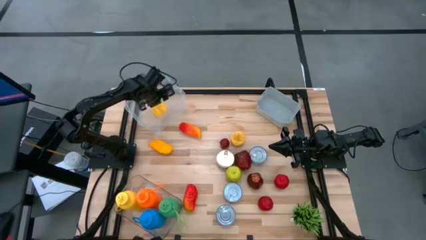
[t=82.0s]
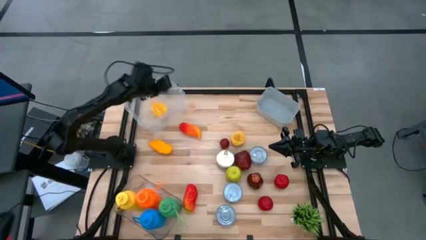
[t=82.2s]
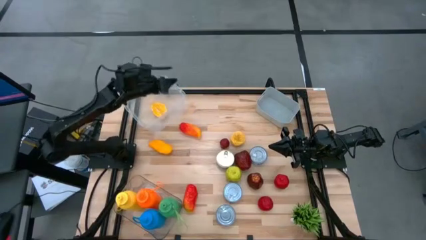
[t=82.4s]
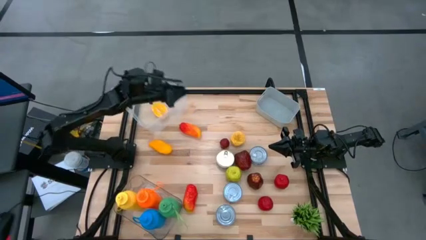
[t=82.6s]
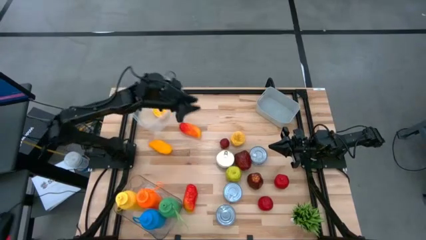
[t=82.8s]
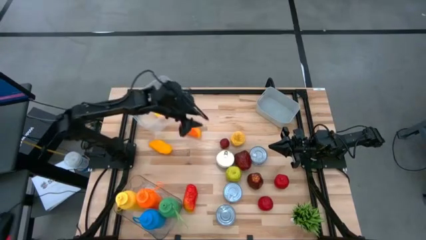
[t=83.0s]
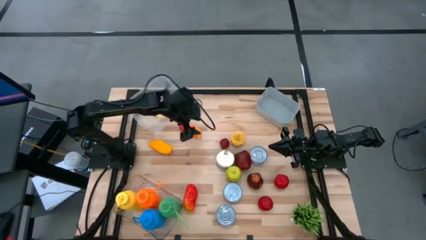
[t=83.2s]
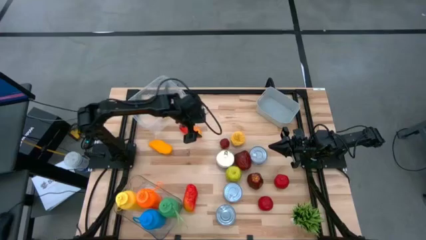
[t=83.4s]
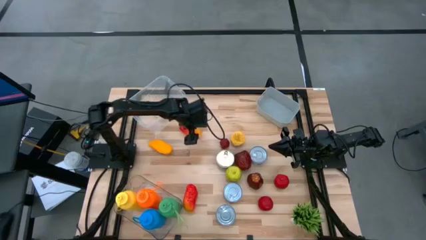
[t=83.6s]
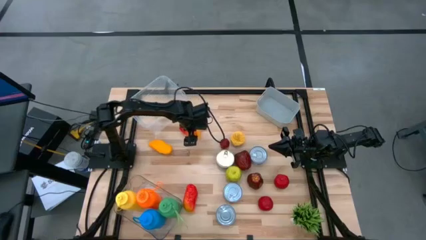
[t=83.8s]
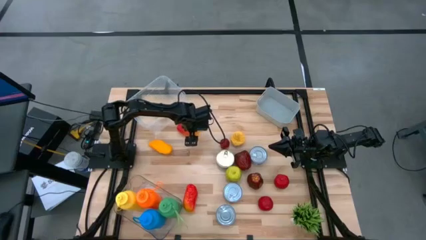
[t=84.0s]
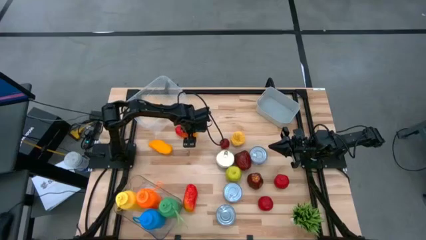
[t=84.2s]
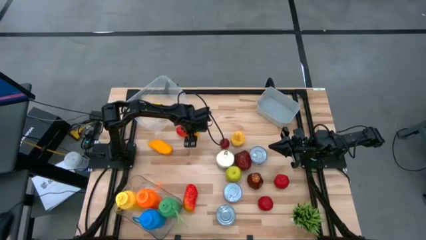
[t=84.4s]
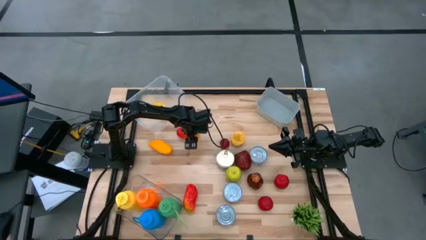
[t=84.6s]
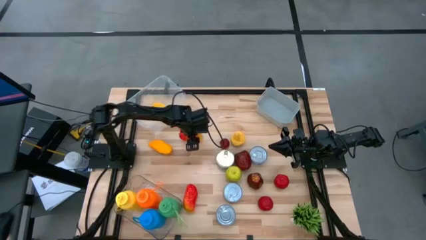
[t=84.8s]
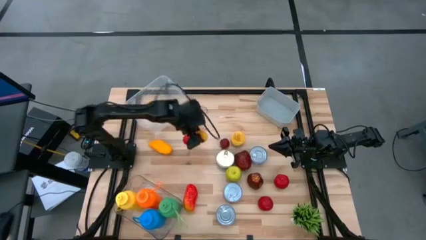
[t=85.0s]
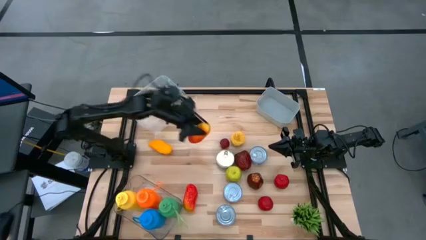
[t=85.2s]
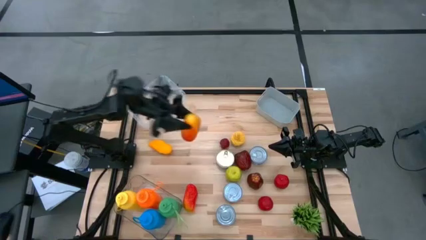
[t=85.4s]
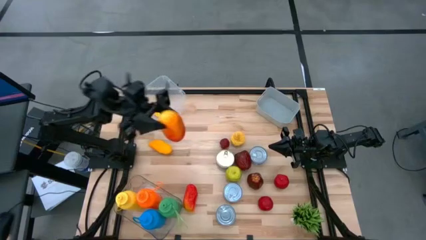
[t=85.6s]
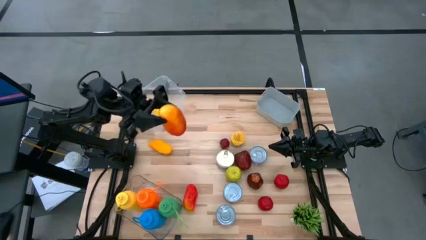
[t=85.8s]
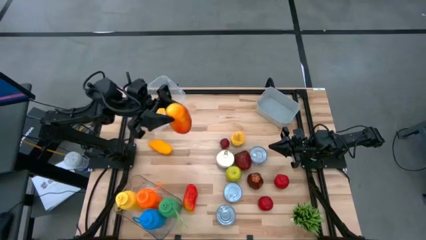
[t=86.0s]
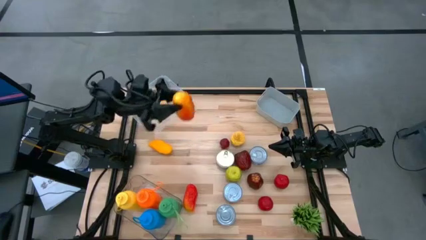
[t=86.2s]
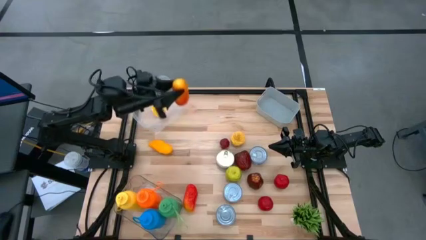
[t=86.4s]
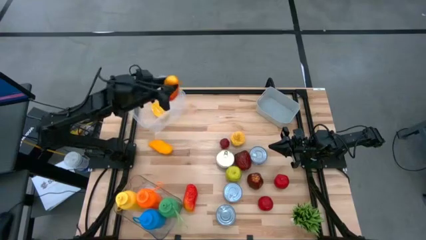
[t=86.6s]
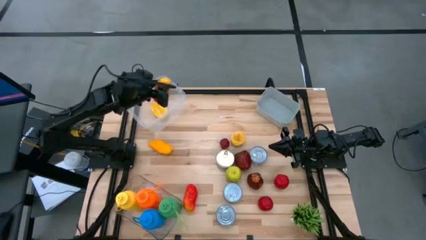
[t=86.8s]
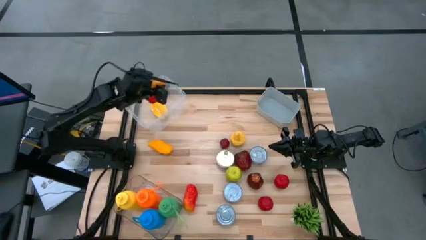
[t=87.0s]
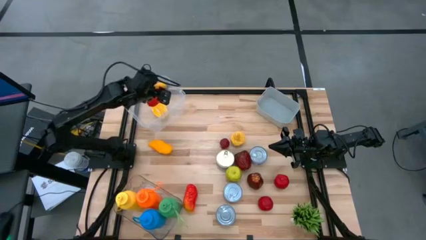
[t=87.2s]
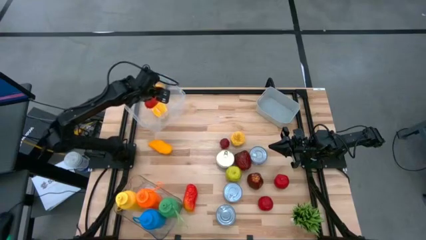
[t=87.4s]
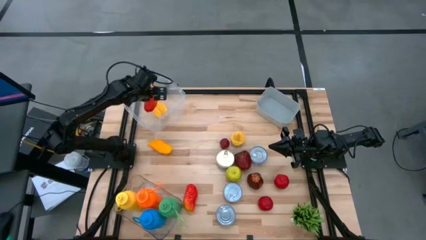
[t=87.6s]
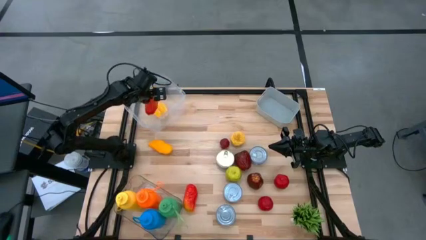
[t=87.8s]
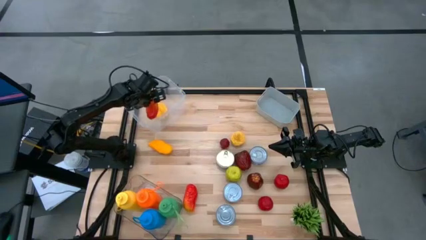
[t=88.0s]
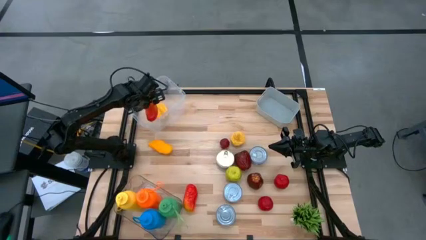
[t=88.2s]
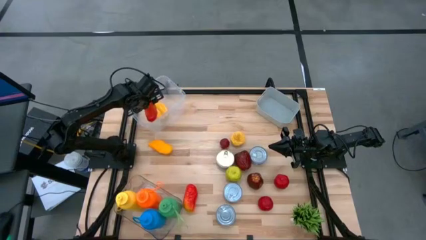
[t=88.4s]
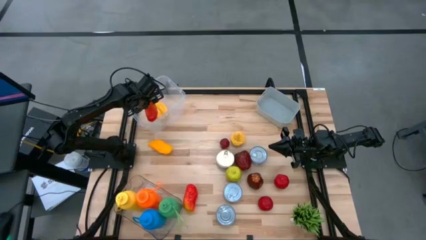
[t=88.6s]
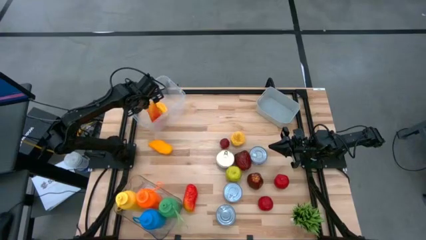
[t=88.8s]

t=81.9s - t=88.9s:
Task: Pick & Place Food Item
Put the top red mango into the white bin

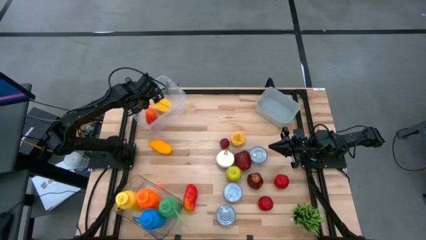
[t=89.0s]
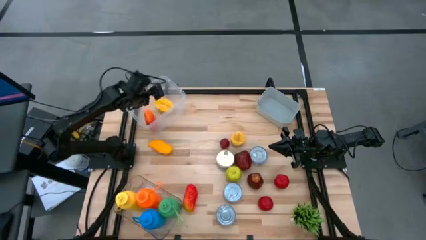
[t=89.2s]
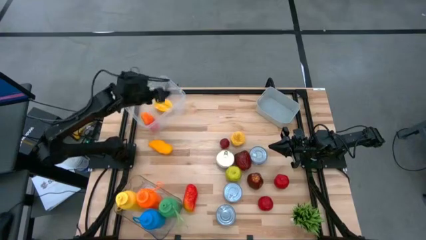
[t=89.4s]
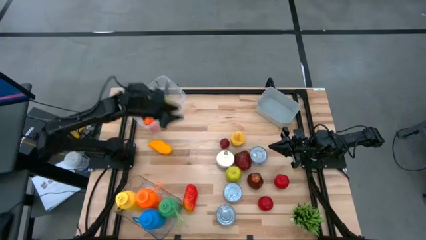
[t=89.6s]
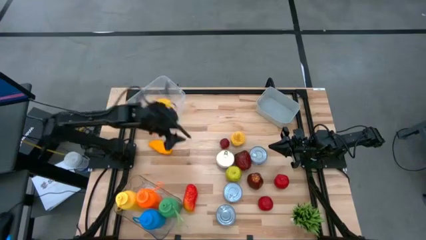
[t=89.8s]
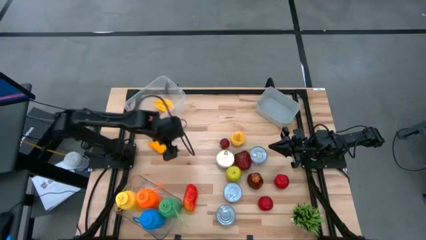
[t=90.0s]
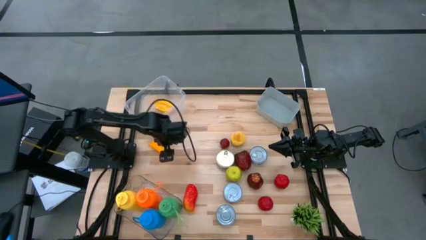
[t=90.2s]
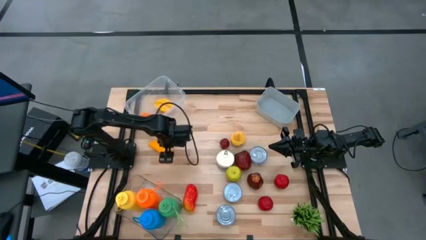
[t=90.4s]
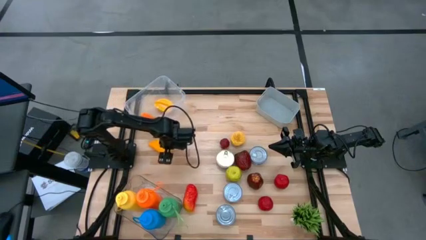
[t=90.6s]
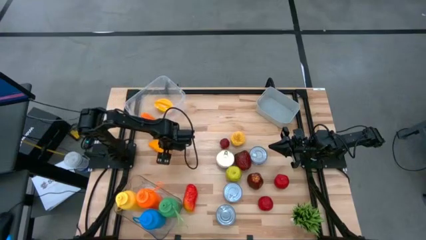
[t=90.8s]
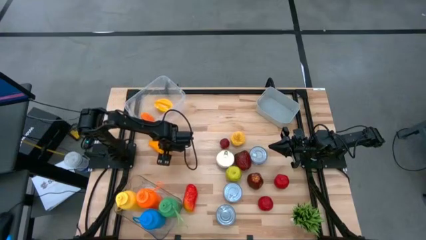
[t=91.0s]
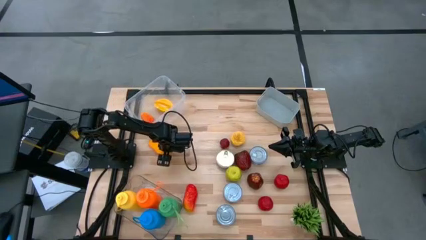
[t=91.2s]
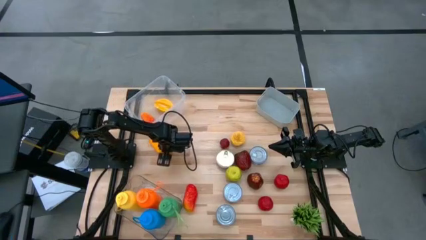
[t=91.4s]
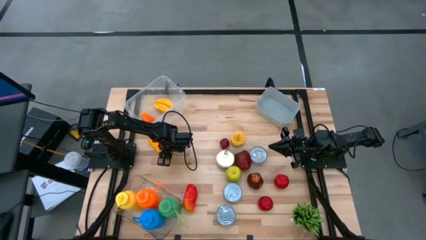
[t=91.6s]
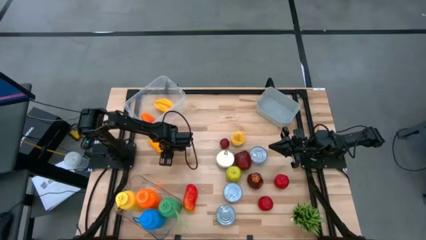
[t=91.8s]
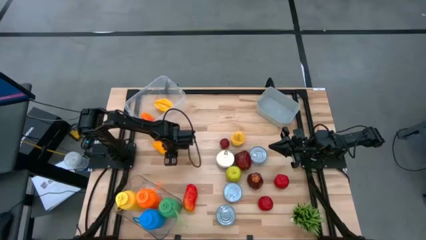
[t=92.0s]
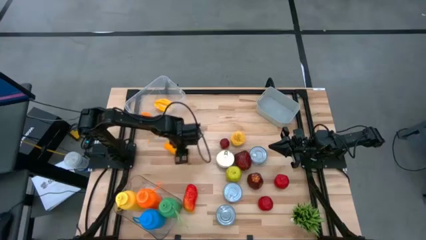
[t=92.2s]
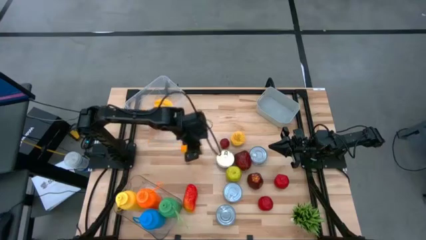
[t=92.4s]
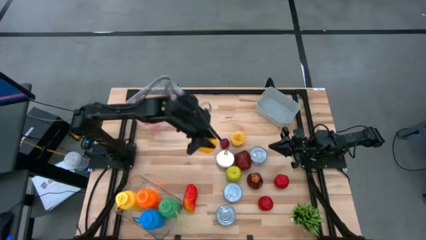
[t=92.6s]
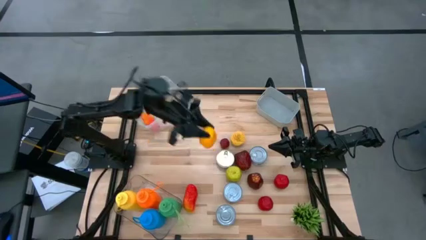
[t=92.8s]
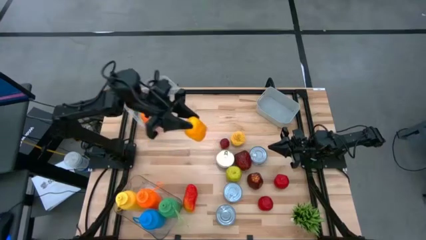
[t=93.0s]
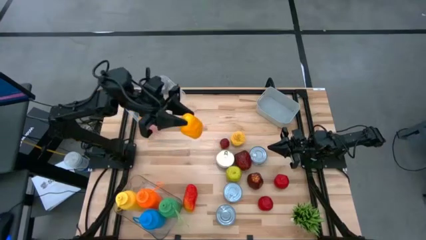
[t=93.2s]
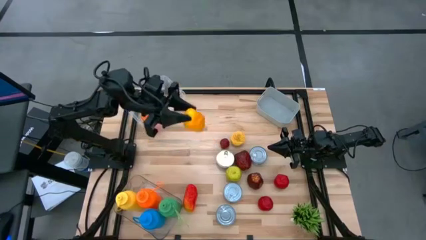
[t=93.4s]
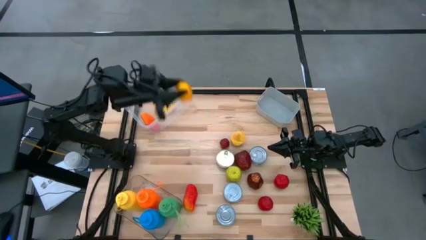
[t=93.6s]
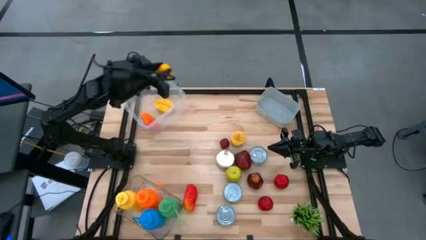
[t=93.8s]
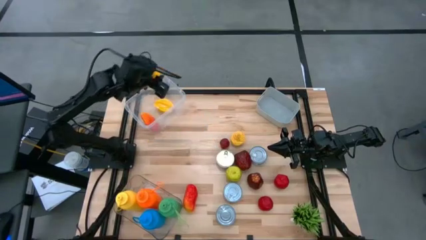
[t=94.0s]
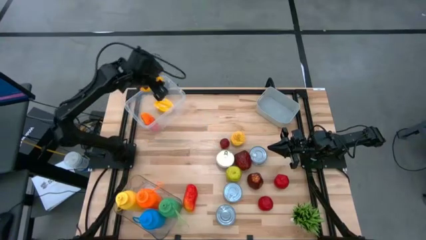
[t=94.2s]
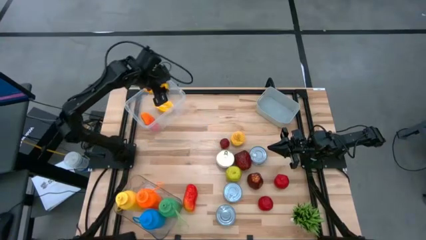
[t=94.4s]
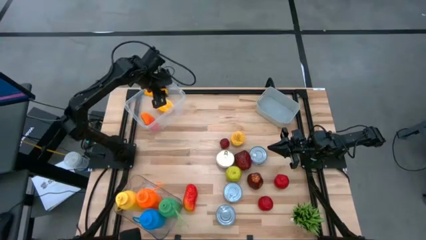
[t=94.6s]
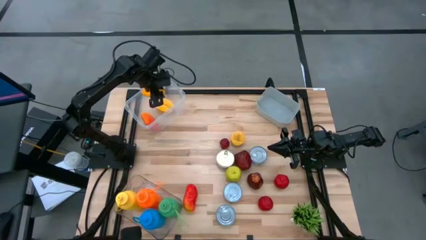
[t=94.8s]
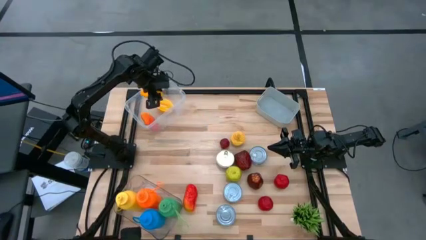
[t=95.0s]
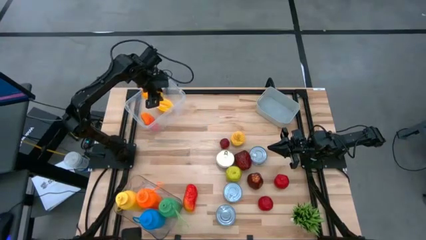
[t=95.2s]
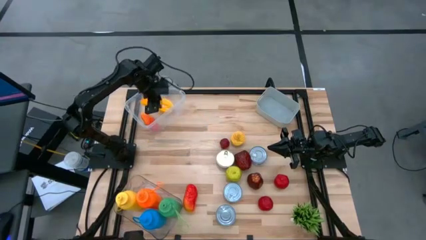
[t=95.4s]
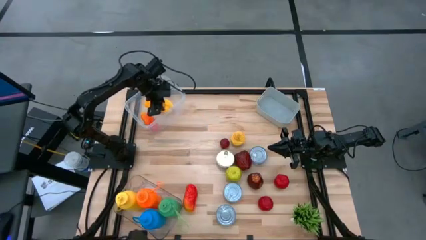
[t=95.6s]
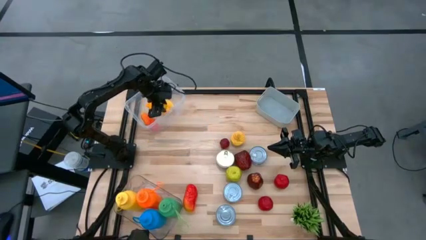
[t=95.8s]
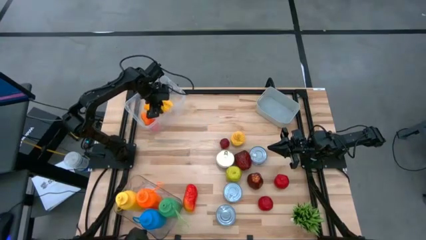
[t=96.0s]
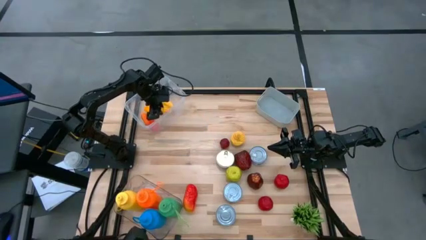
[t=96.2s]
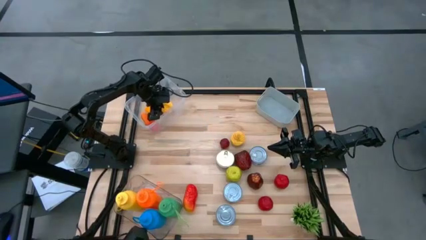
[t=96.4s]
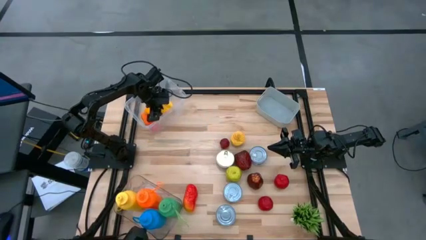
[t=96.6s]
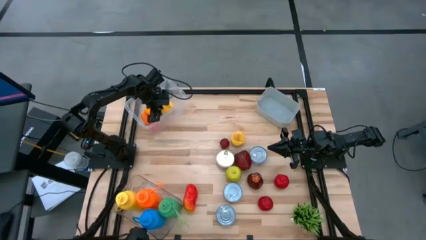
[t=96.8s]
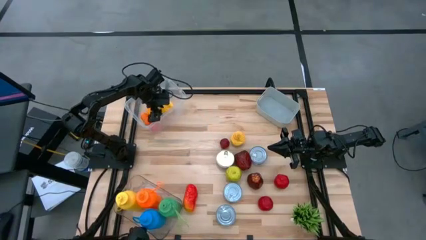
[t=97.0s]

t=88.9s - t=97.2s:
Put the mango into the white bin

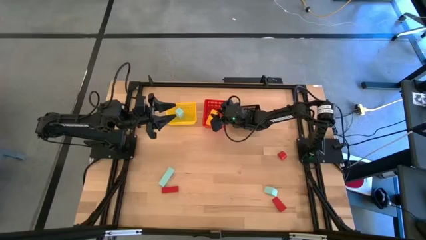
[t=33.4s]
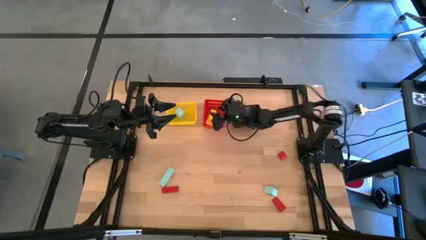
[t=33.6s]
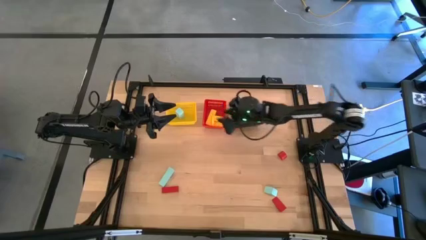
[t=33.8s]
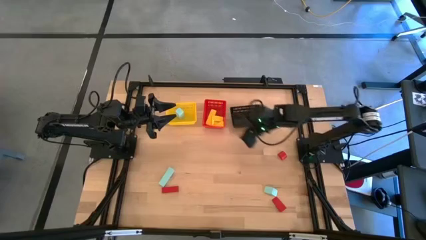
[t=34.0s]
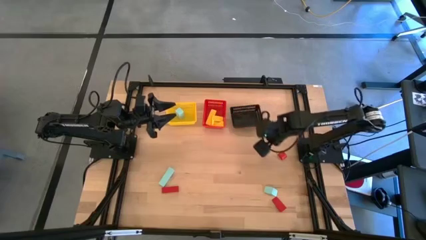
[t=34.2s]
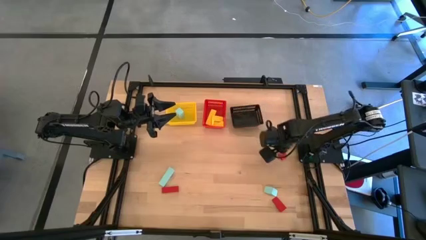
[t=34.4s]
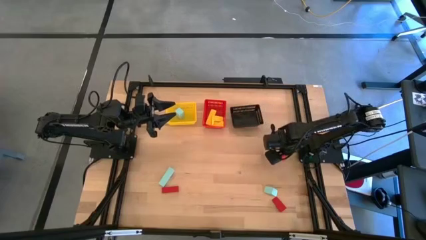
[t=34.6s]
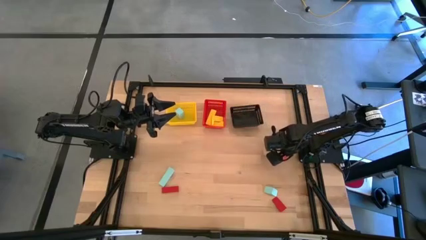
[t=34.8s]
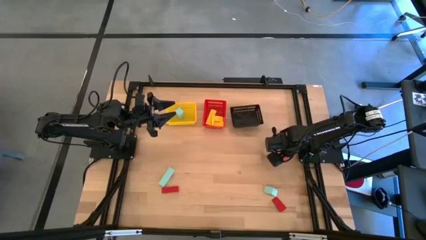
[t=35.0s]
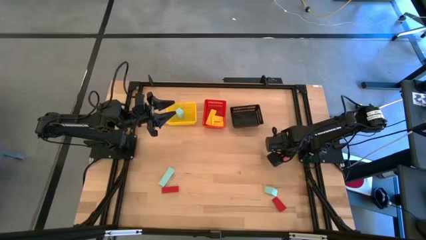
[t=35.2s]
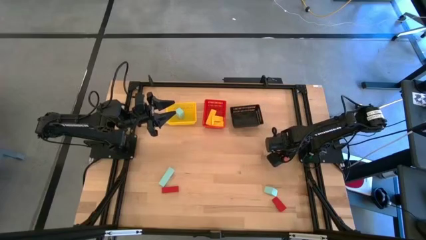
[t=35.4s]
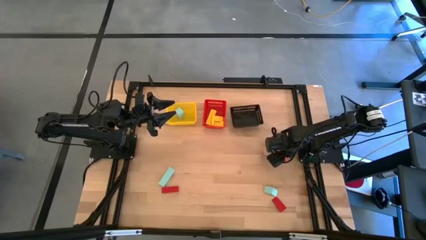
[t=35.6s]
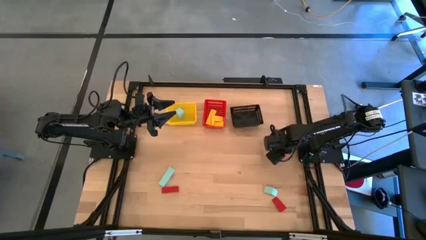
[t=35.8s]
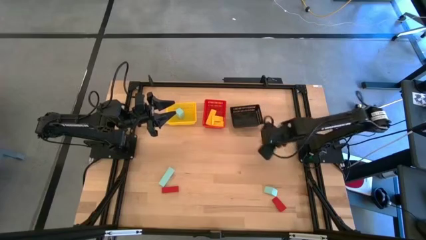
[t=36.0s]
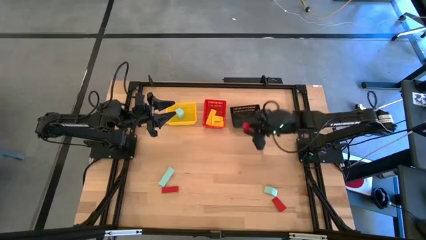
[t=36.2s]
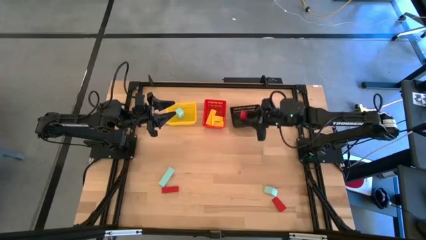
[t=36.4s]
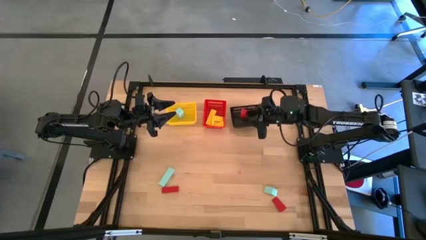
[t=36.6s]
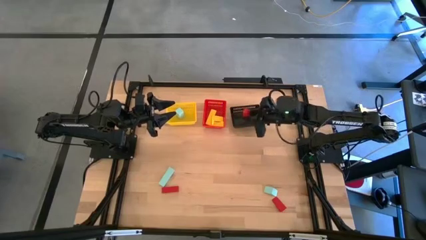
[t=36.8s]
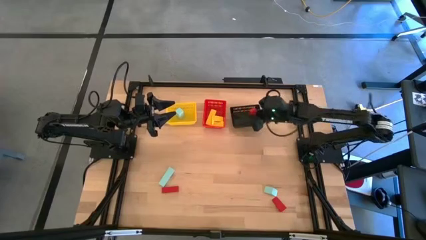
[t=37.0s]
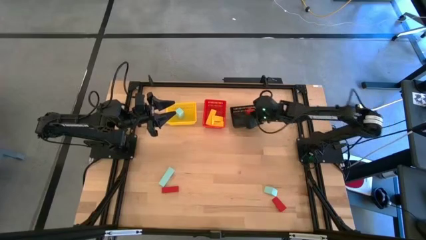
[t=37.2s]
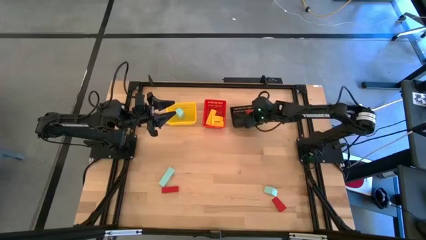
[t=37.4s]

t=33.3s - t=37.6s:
Task: Sort & place blocks by color
Put the top red block into the black basket
